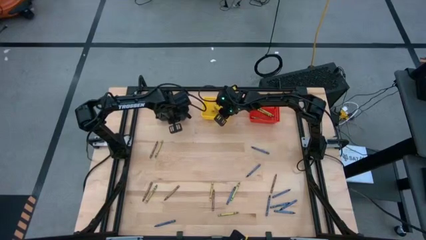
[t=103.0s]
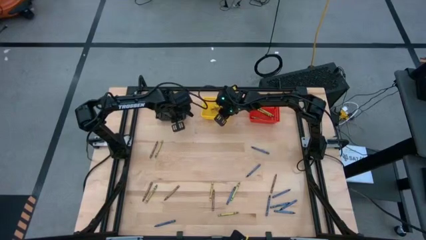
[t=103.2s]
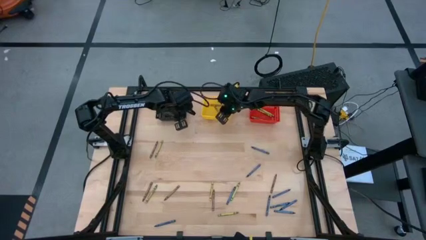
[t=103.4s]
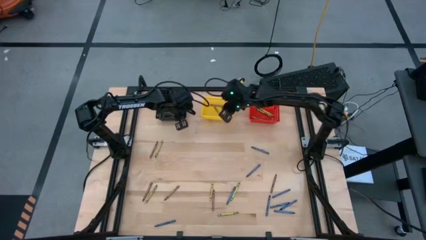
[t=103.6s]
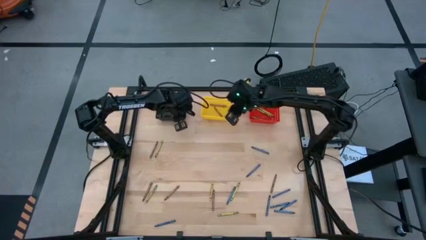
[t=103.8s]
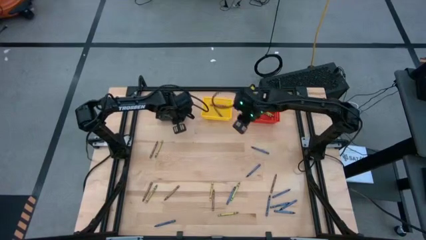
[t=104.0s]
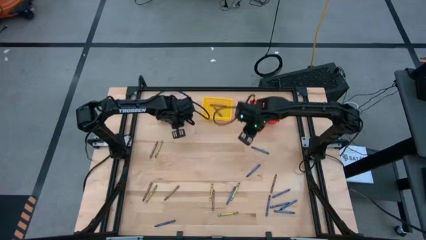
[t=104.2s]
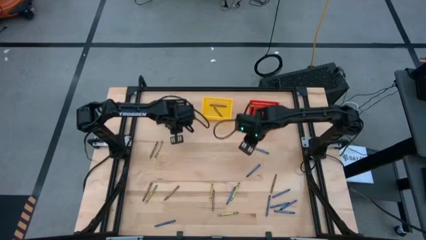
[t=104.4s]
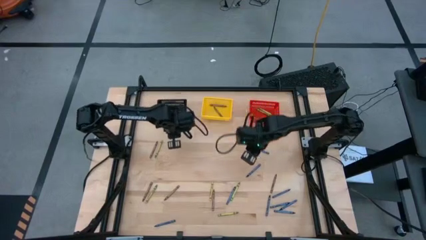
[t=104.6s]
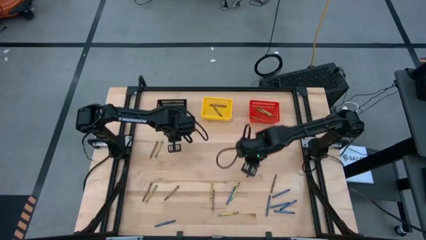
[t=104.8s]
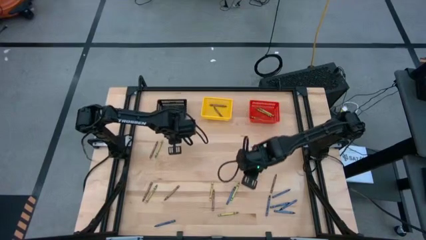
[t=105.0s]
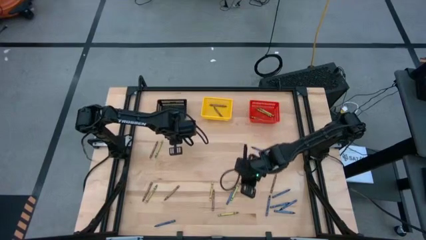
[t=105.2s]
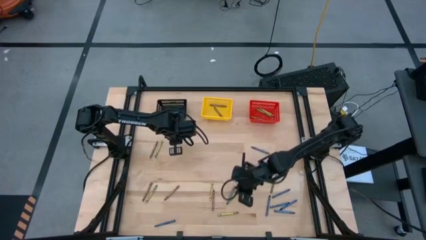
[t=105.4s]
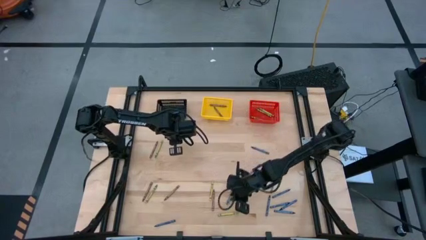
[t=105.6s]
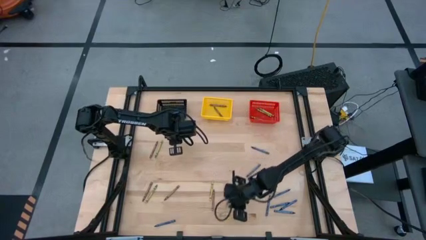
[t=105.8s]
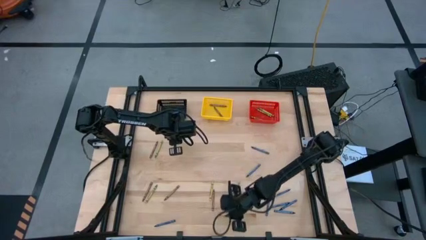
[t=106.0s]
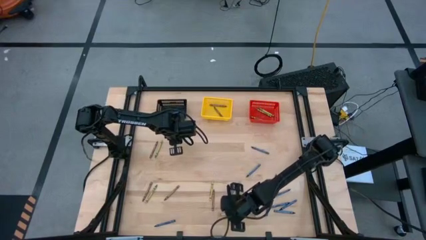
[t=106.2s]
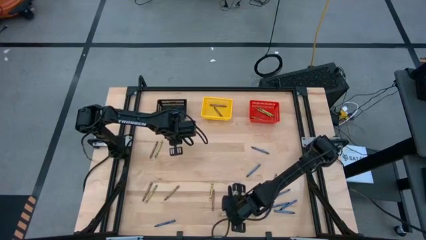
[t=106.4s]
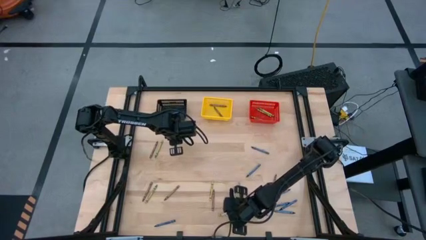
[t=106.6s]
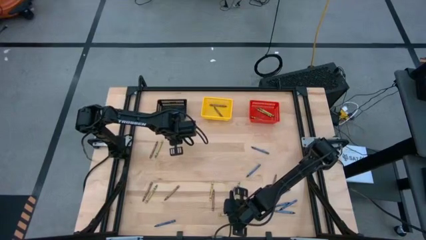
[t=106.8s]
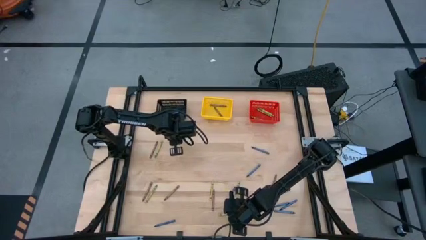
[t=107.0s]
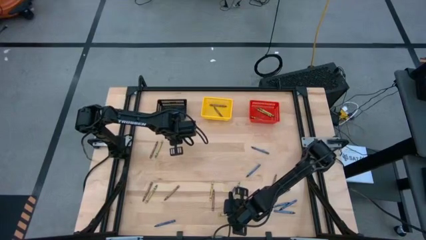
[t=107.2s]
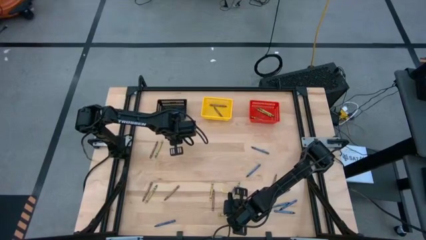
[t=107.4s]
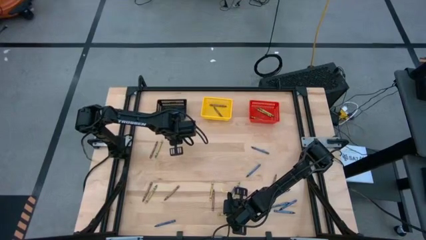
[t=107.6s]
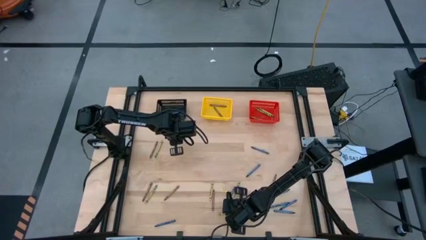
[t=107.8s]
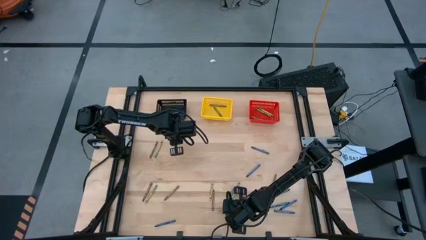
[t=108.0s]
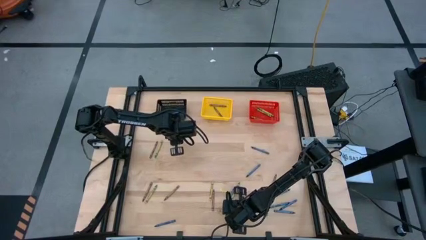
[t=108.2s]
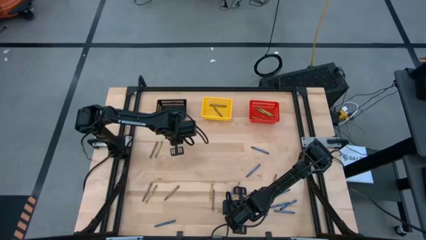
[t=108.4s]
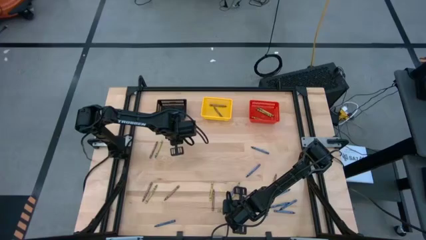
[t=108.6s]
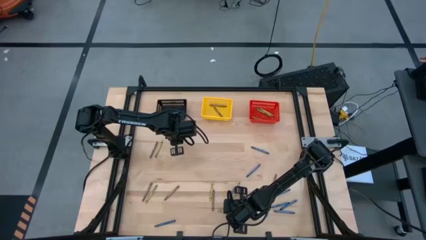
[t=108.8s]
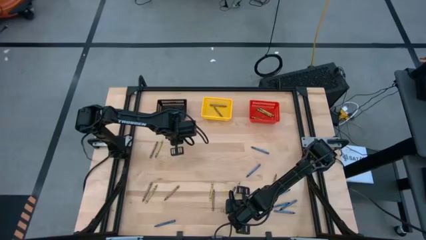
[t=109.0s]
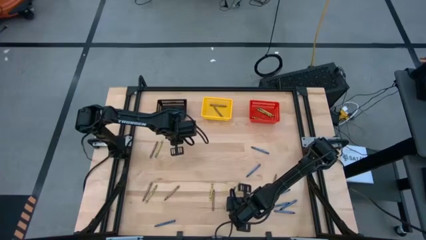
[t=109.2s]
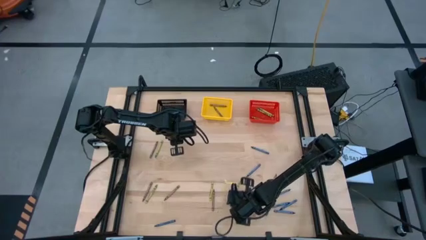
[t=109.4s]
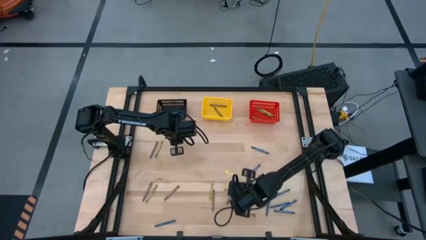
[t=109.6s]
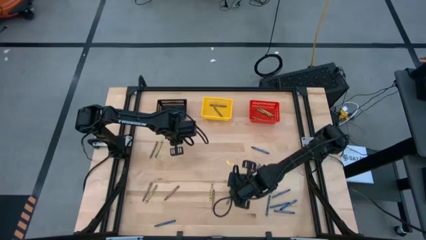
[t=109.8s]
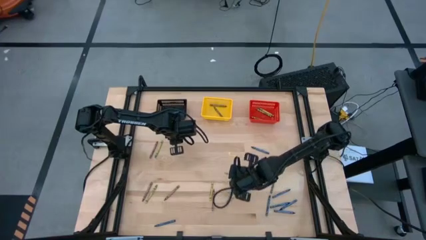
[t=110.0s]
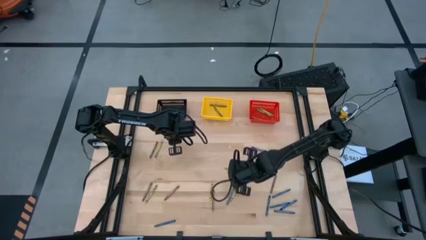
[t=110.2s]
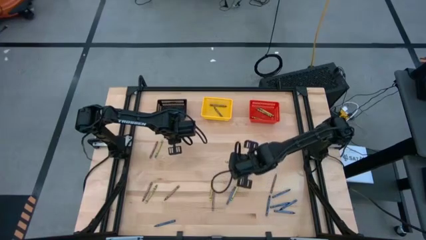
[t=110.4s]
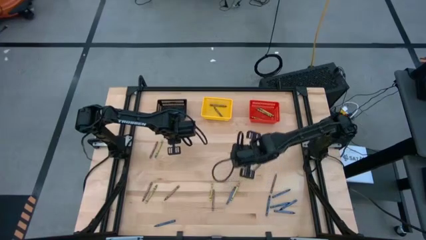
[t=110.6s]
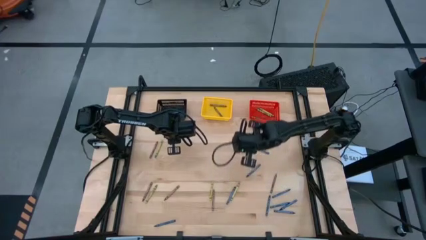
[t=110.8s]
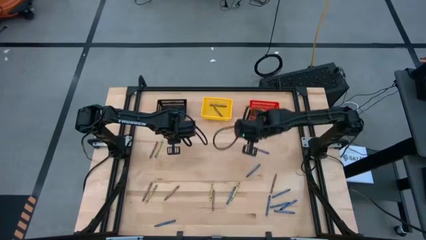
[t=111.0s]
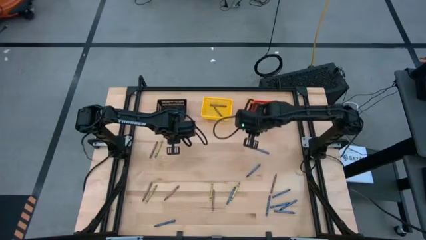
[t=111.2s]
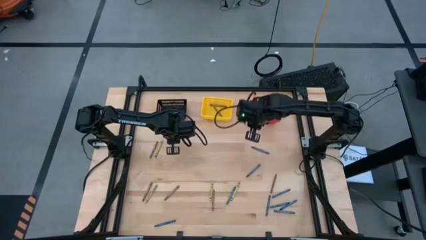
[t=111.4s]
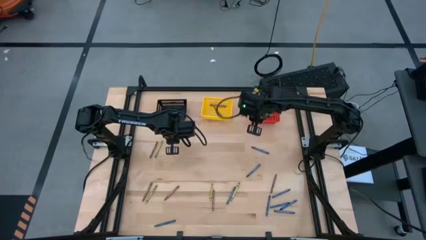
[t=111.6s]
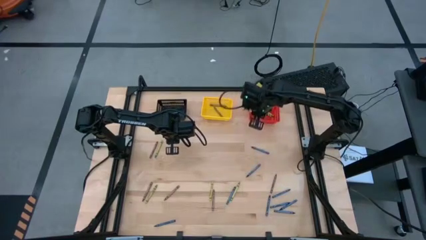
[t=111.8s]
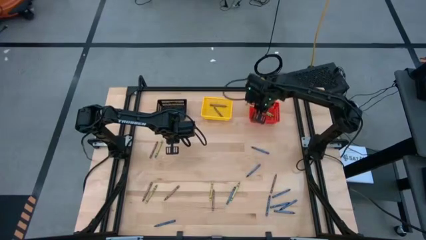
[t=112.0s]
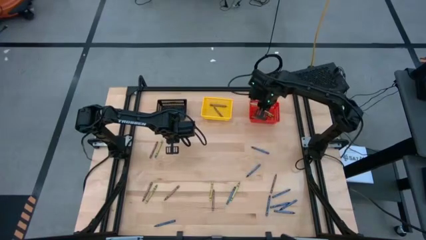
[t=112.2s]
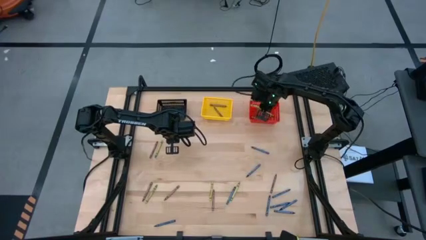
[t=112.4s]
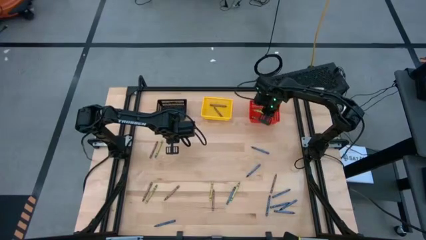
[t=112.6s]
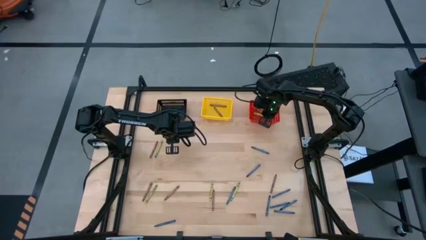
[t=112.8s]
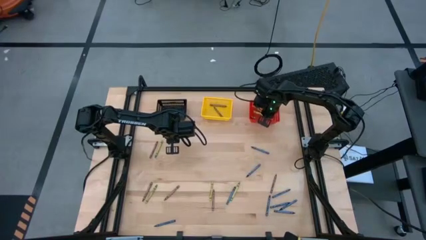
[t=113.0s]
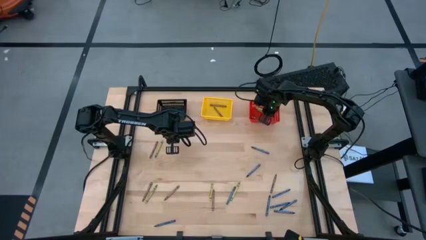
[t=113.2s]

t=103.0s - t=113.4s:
Task: Sort crayons
Put the green crayon into the red bin

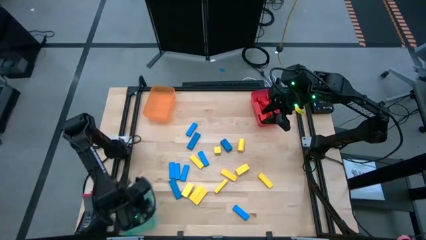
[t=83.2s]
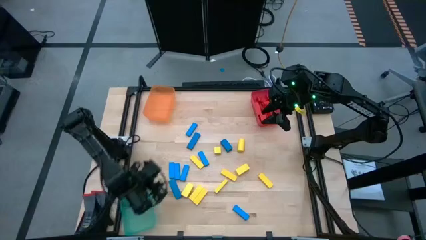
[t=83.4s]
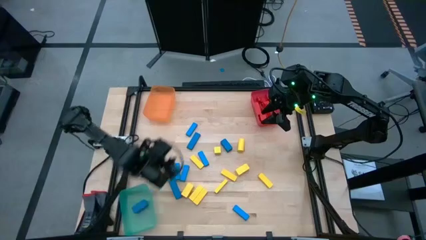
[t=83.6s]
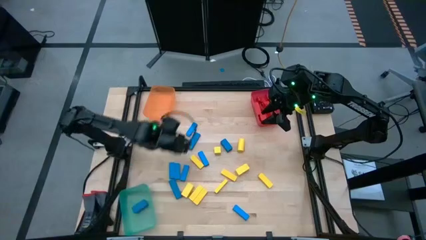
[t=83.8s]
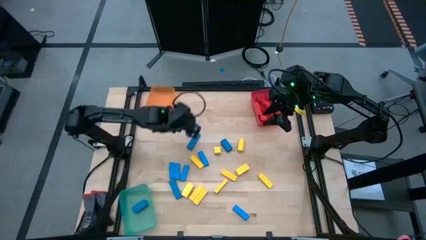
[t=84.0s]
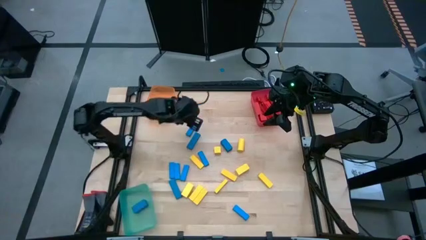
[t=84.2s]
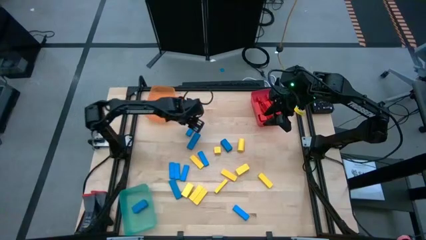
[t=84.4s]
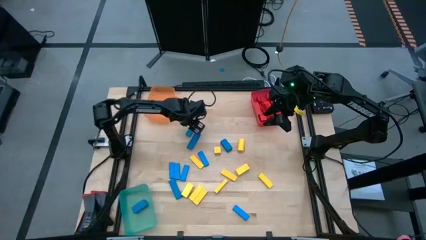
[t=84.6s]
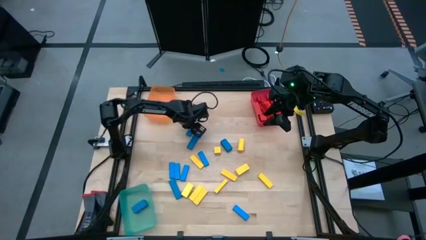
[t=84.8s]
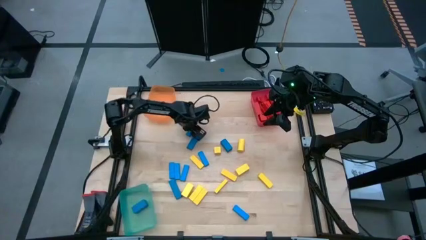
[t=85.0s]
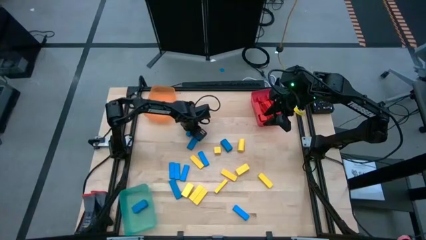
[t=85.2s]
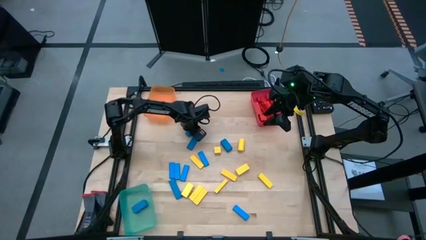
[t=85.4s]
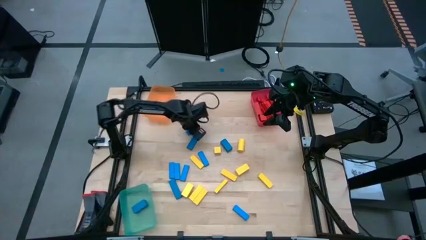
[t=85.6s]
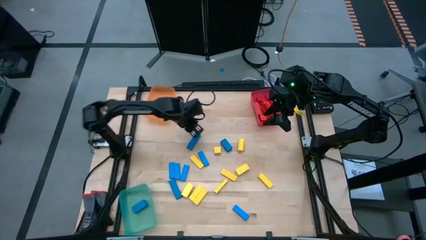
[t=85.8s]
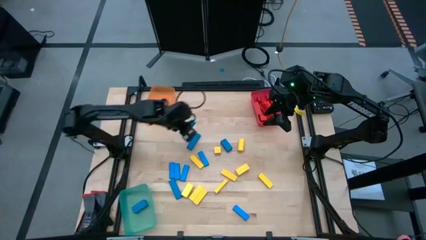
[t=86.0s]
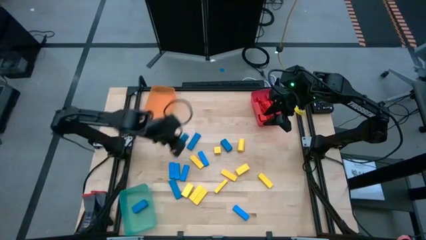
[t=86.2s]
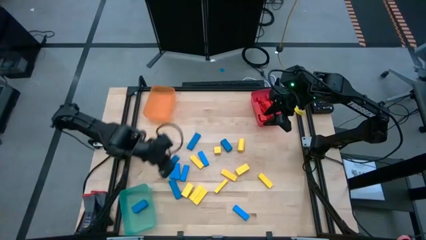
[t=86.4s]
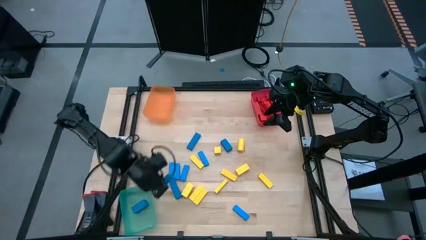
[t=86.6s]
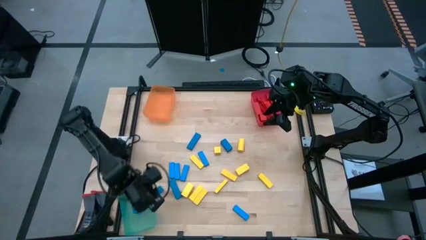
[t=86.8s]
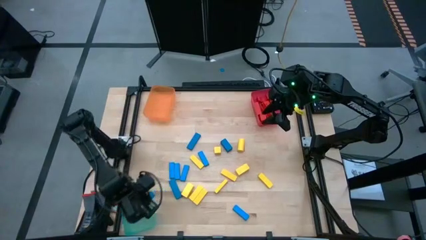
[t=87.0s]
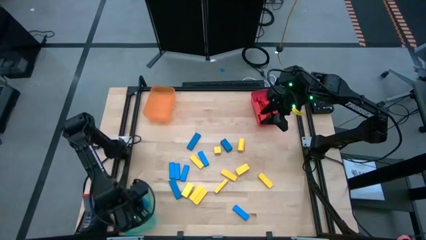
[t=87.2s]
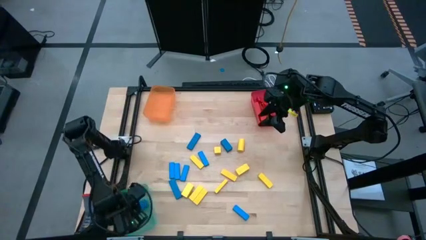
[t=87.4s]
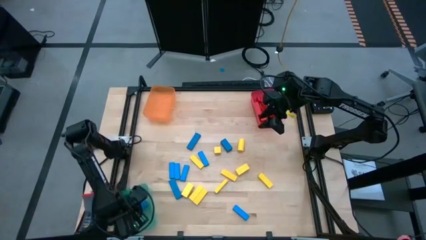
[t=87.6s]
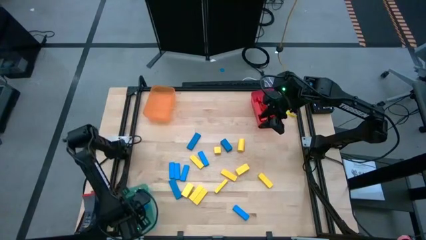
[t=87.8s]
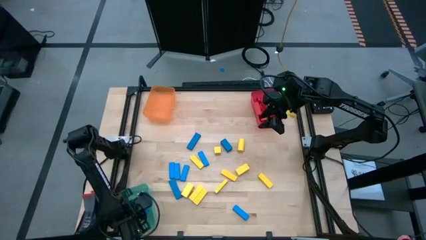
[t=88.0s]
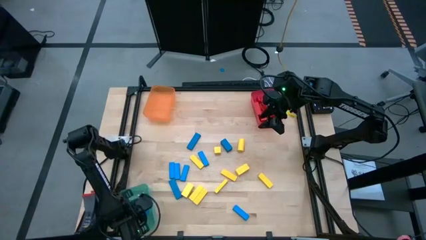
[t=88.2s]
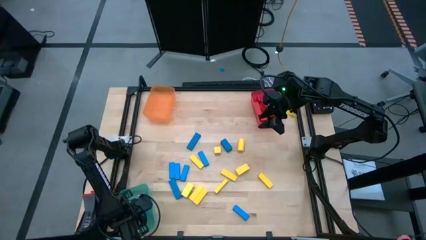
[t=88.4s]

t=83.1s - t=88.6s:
Task: Sort blocks
Put the blue block into the green transparent bin
